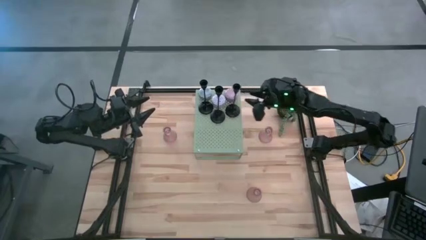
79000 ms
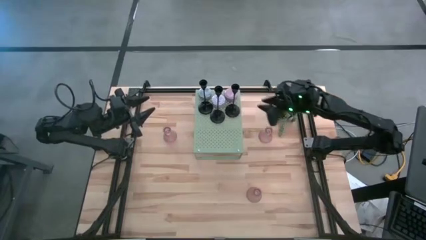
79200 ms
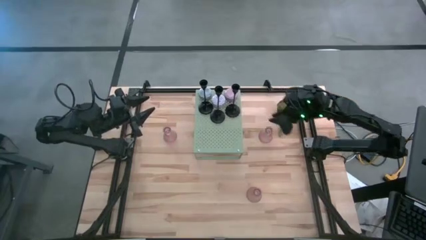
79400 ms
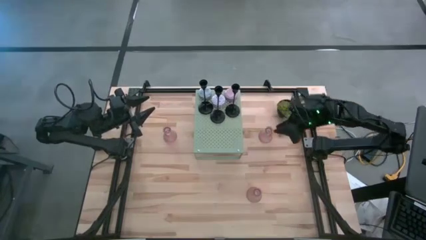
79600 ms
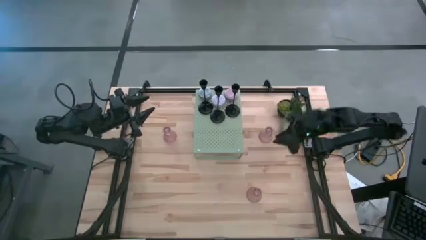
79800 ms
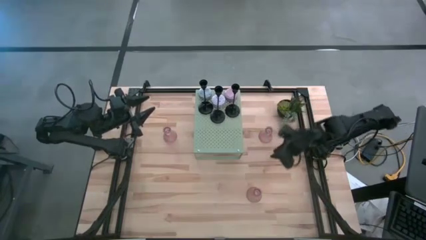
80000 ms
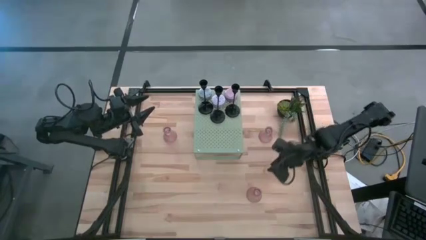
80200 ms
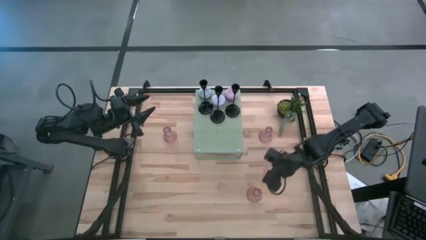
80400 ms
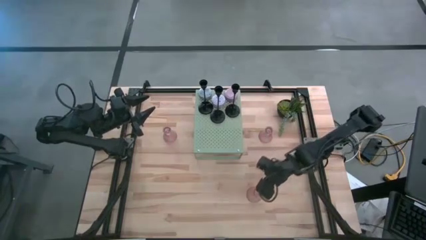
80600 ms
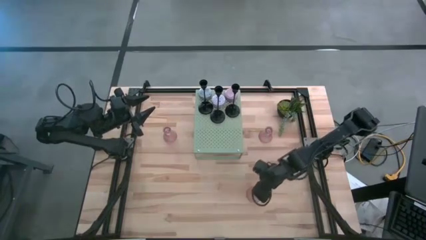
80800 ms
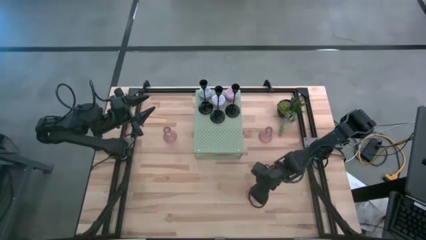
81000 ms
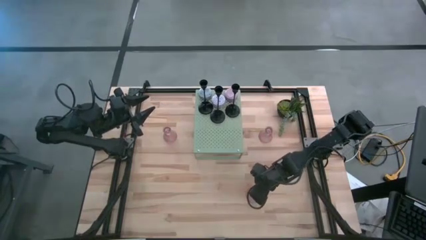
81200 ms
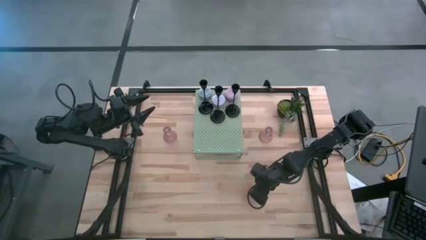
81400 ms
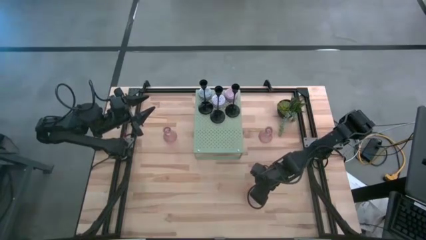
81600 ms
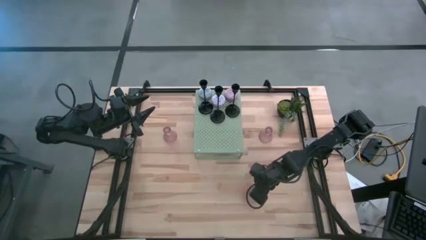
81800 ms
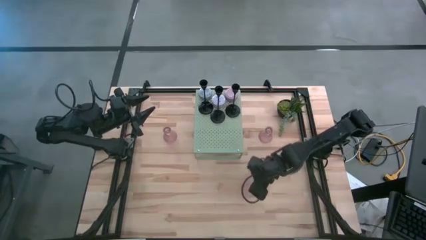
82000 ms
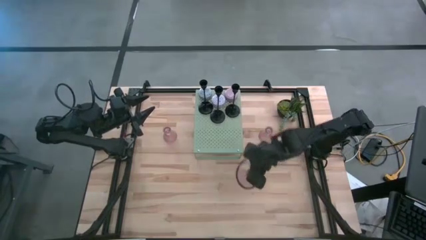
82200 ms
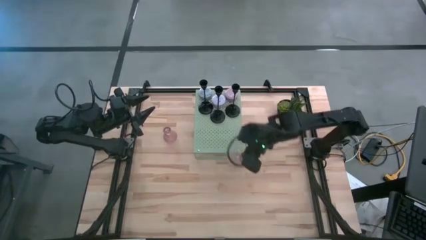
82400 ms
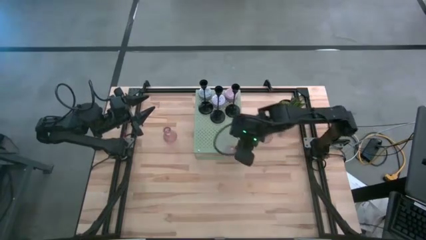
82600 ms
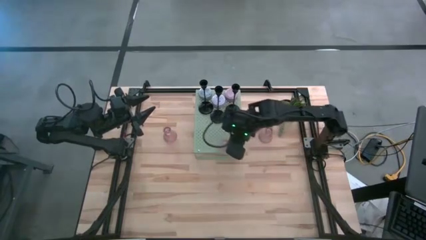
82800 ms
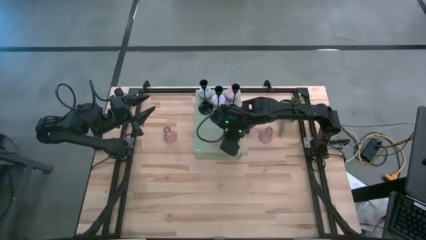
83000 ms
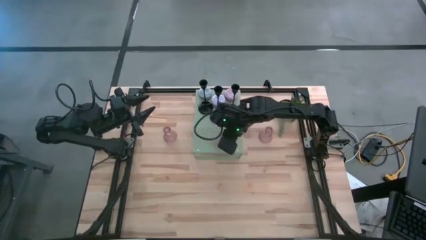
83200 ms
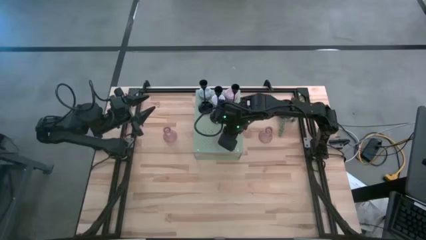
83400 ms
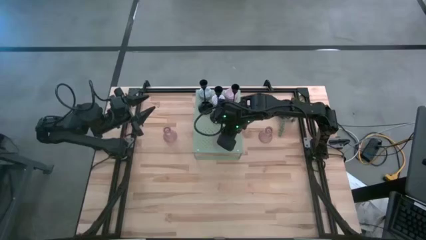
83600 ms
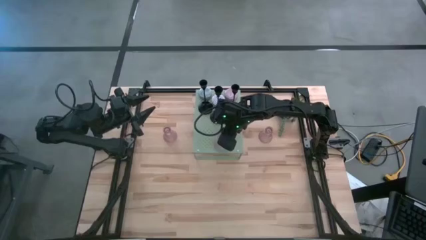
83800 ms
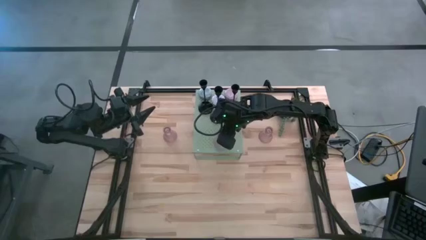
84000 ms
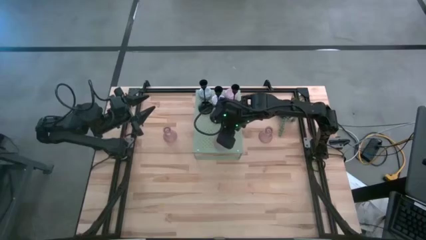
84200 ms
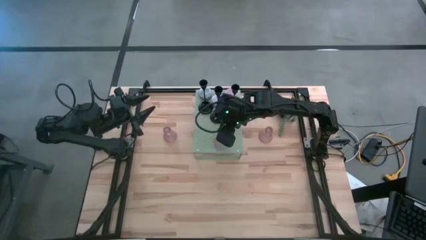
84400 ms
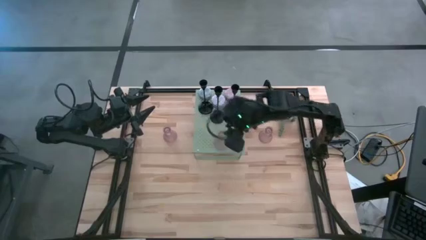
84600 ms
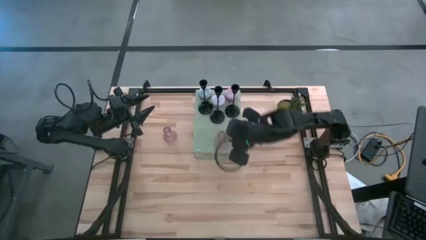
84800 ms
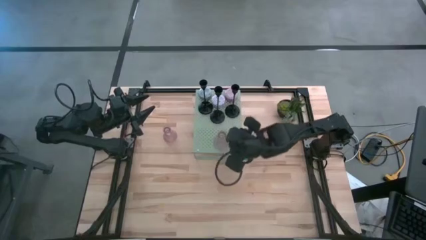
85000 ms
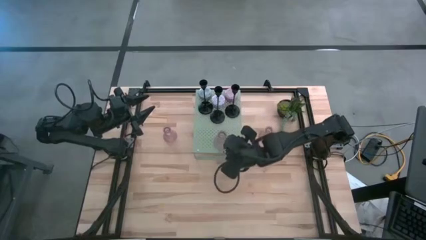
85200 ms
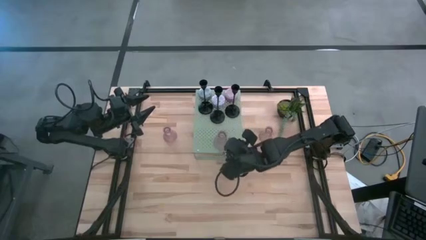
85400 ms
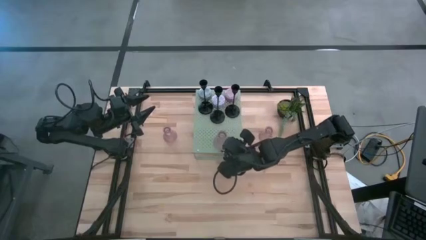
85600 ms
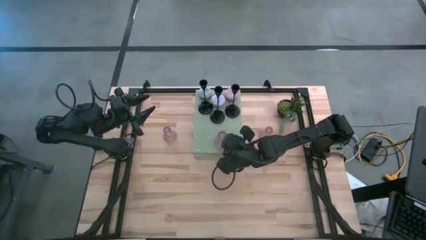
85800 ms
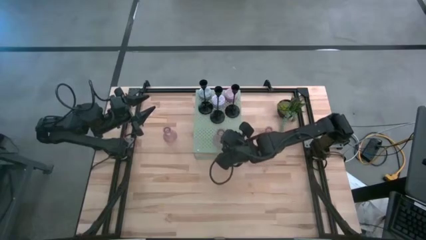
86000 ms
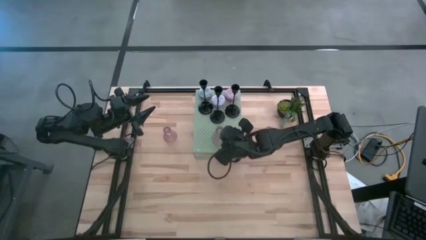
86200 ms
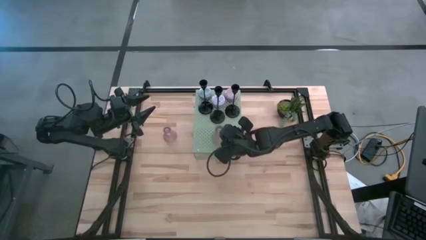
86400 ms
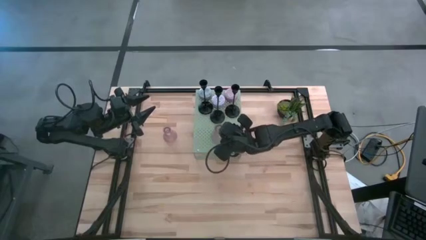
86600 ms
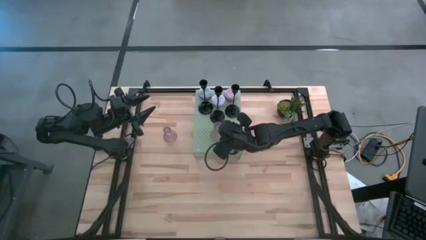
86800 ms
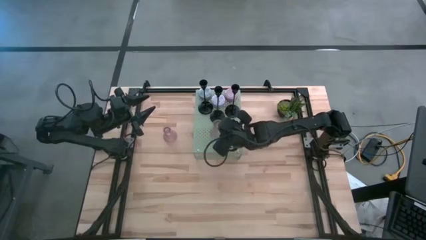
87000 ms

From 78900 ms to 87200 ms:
Task: Pick & Place candle stick holders
Put the bottom pink candle holder on the shelf

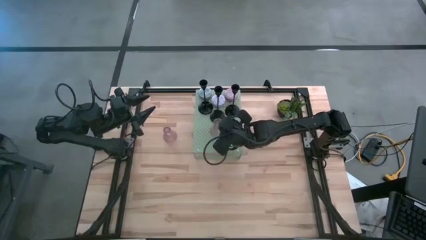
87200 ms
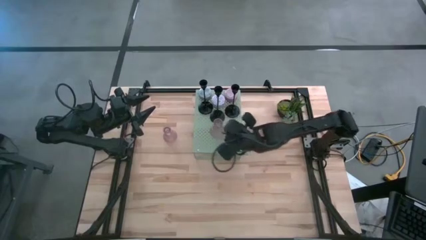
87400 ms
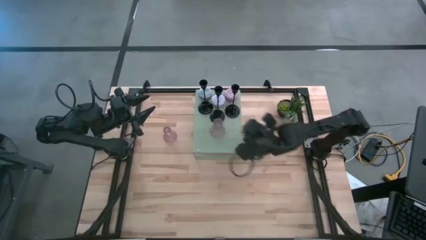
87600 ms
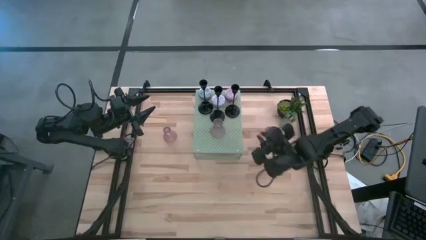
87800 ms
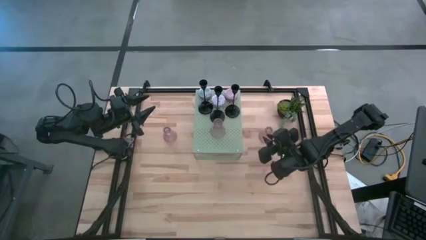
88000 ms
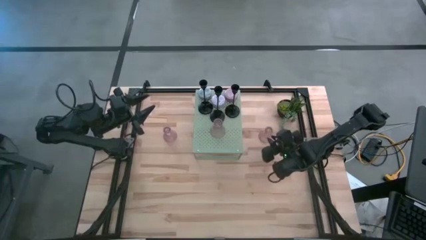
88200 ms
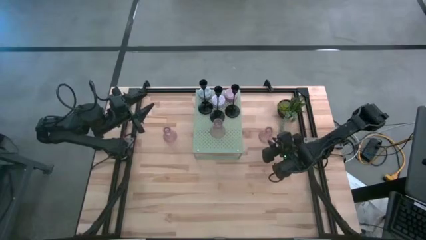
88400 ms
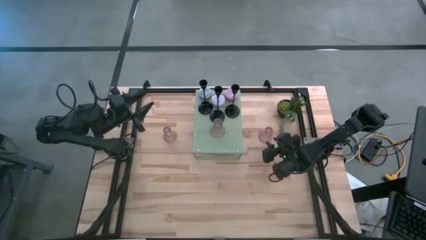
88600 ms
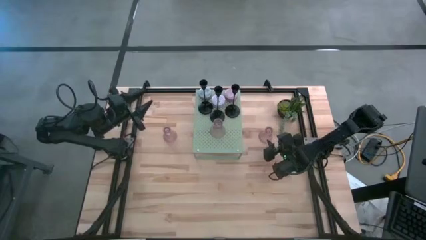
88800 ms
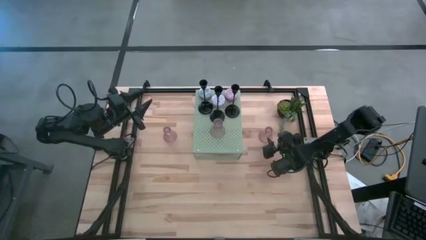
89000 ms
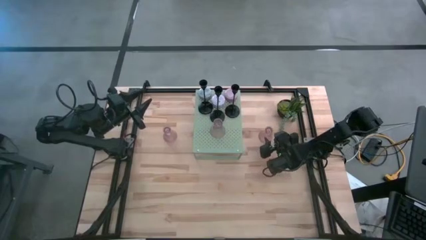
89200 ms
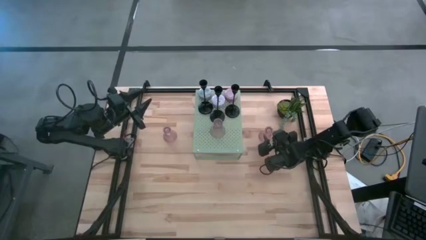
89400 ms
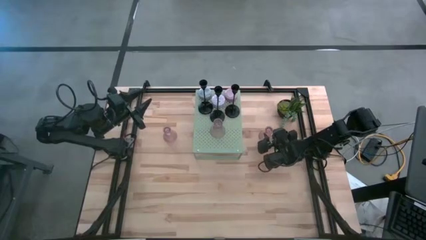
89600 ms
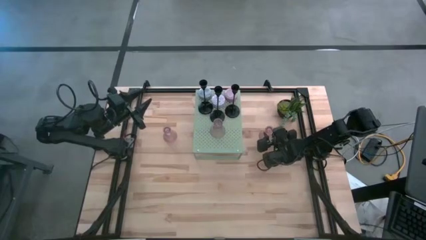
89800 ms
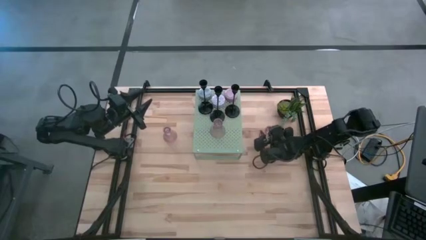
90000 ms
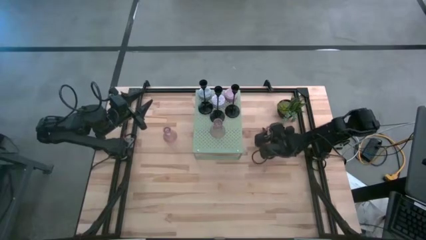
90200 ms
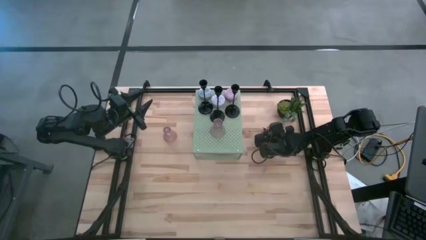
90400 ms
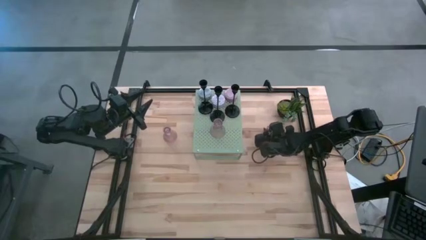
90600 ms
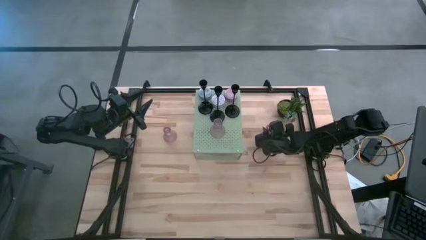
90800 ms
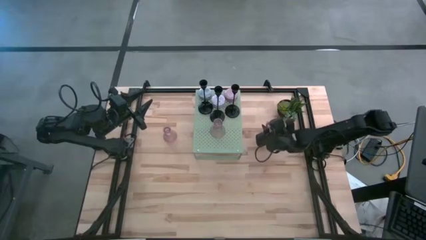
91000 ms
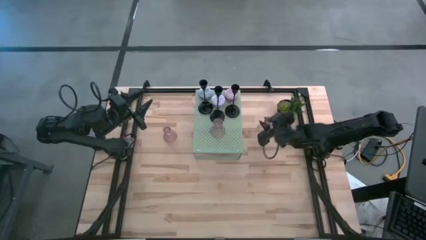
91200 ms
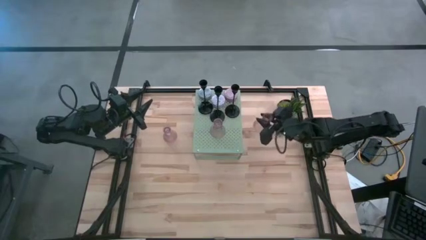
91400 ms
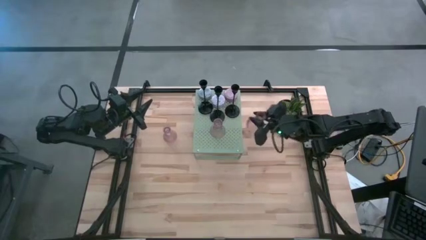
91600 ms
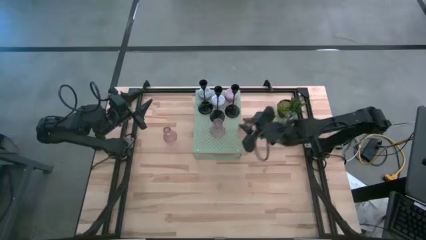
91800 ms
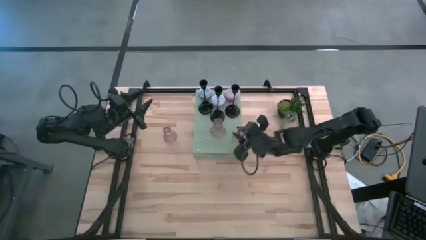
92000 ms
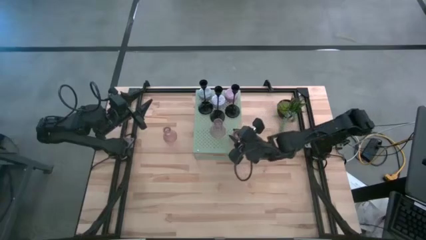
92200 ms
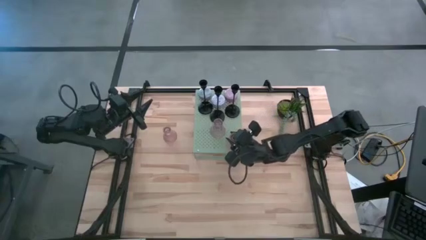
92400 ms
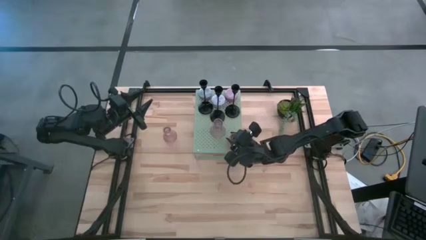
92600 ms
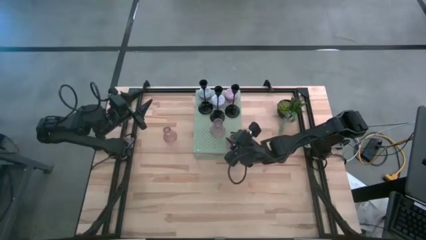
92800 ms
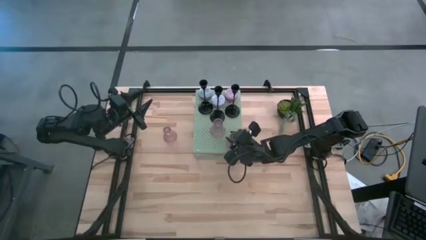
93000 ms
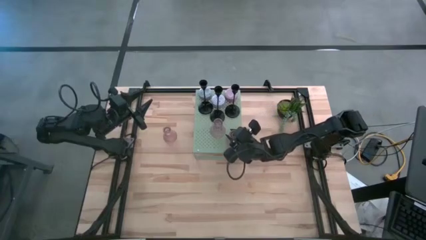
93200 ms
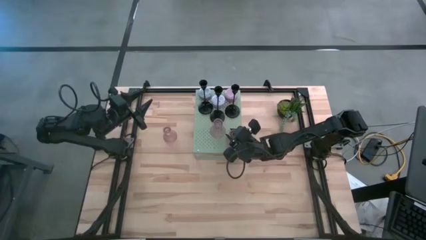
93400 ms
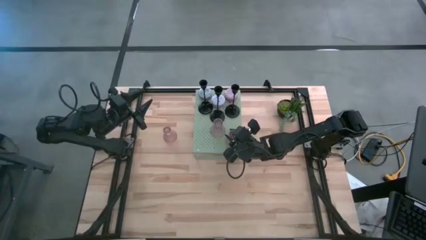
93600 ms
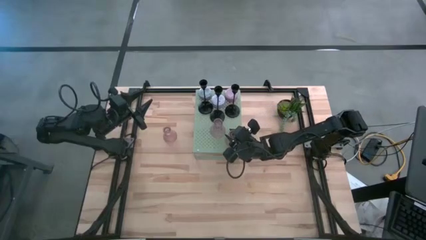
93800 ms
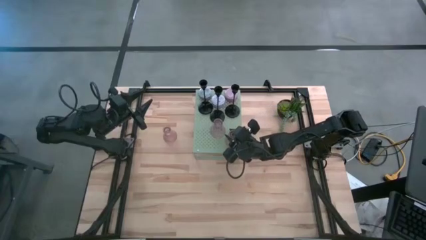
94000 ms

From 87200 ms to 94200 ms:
Put the right pink candle holder on the shelf
